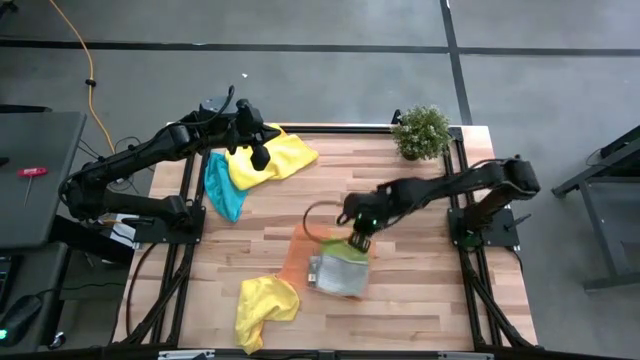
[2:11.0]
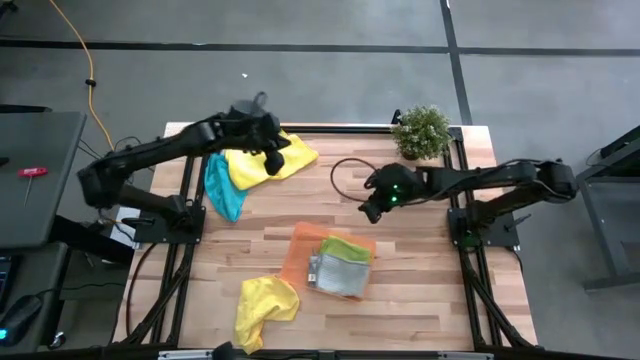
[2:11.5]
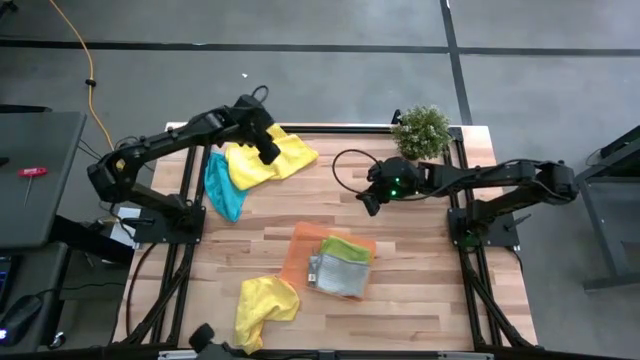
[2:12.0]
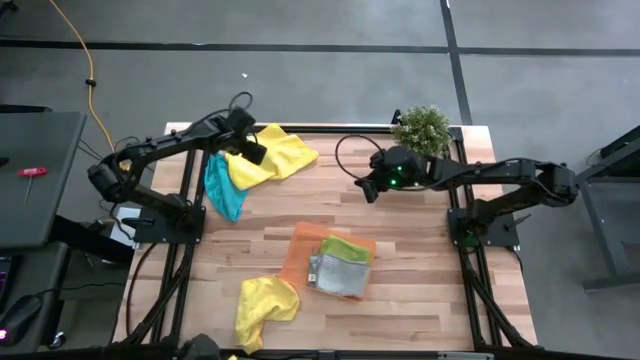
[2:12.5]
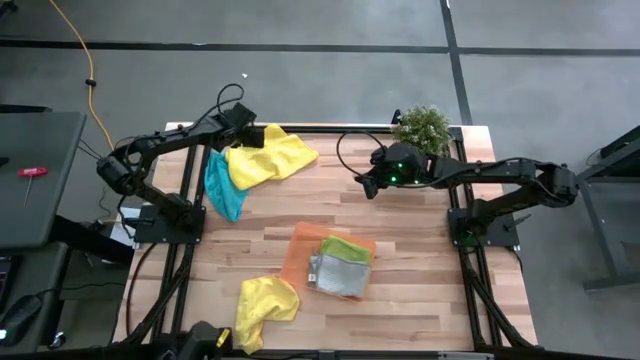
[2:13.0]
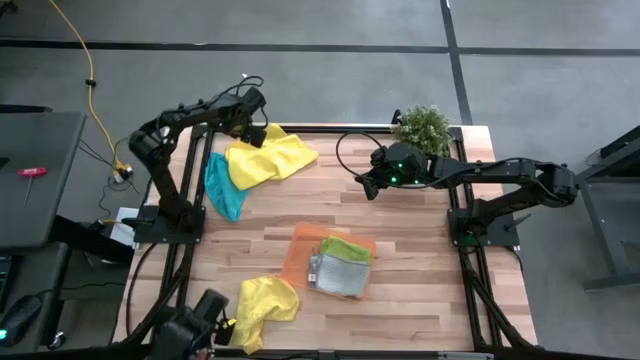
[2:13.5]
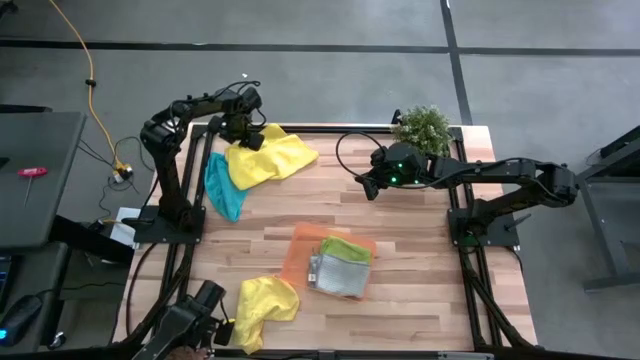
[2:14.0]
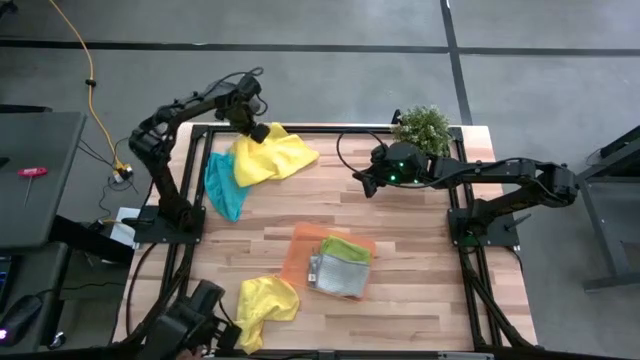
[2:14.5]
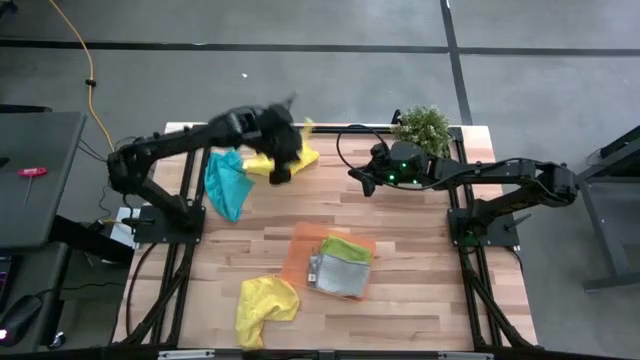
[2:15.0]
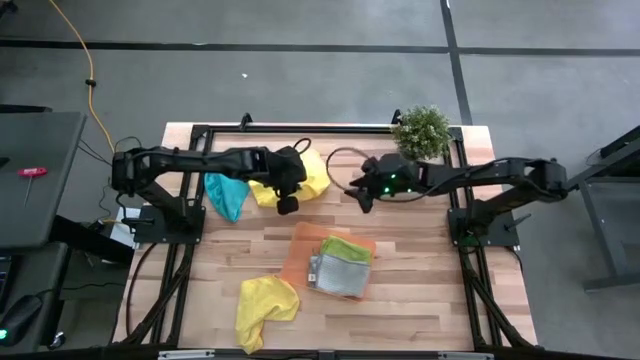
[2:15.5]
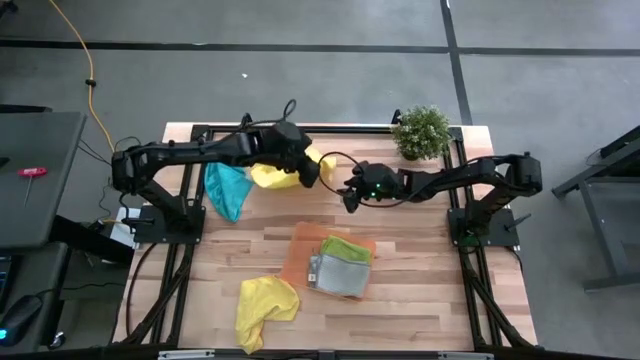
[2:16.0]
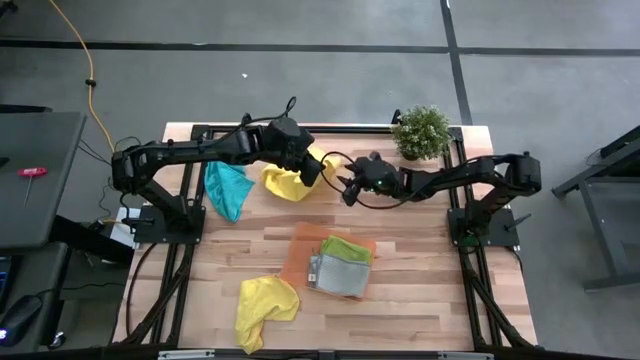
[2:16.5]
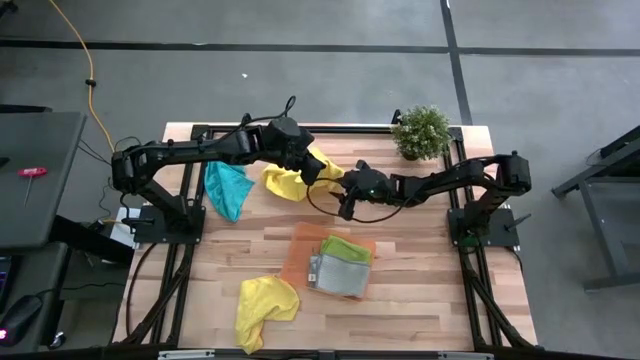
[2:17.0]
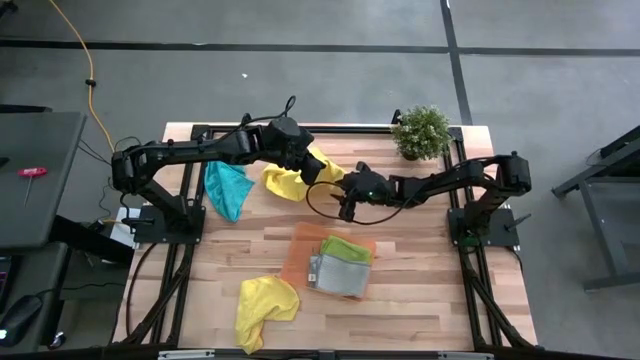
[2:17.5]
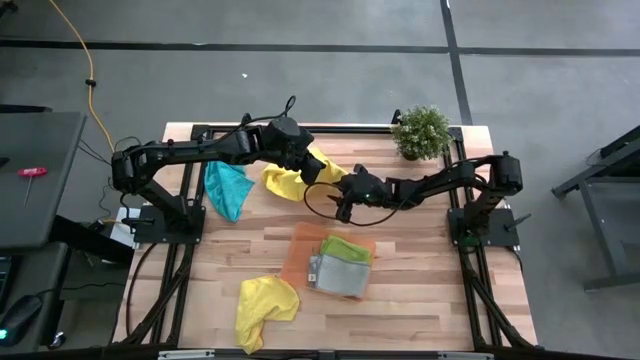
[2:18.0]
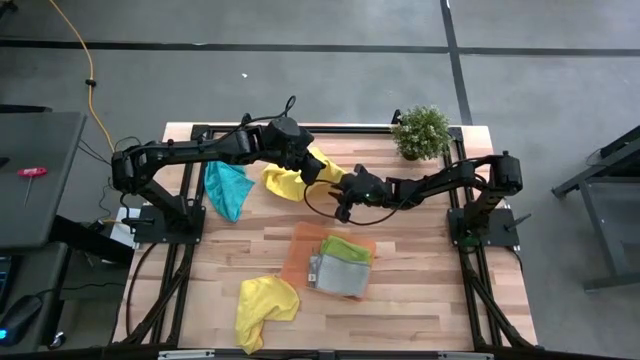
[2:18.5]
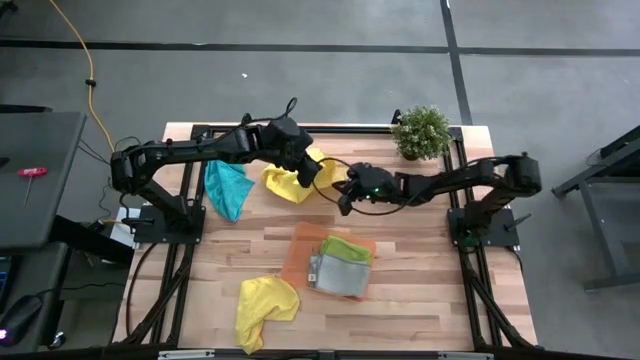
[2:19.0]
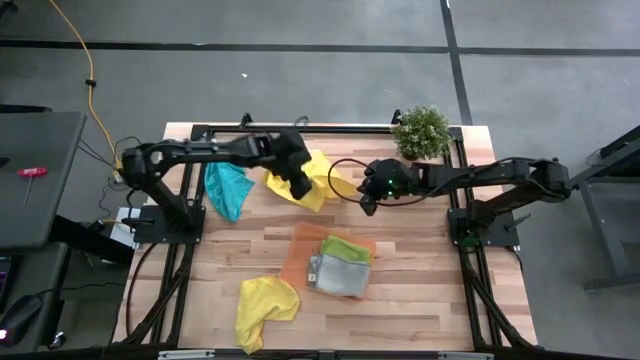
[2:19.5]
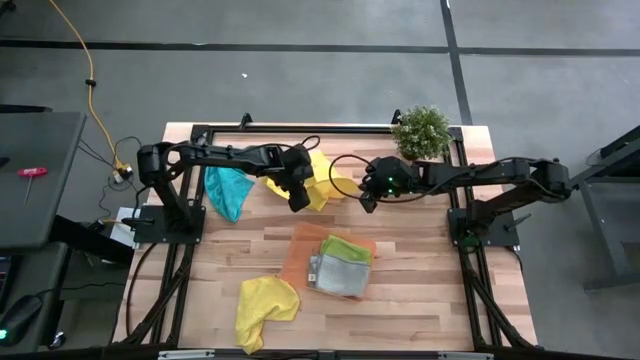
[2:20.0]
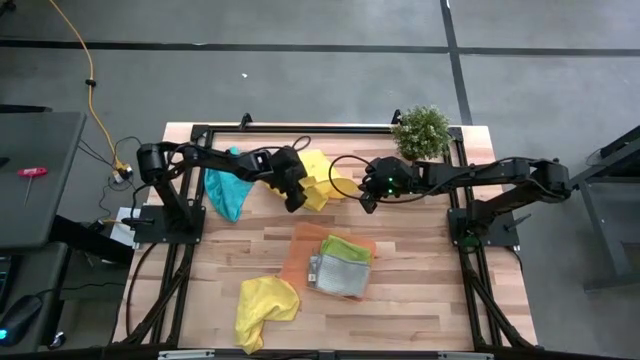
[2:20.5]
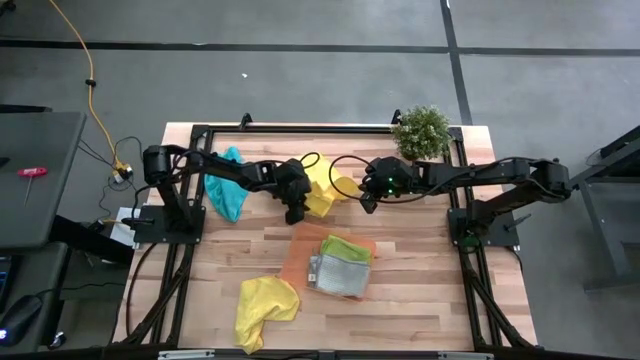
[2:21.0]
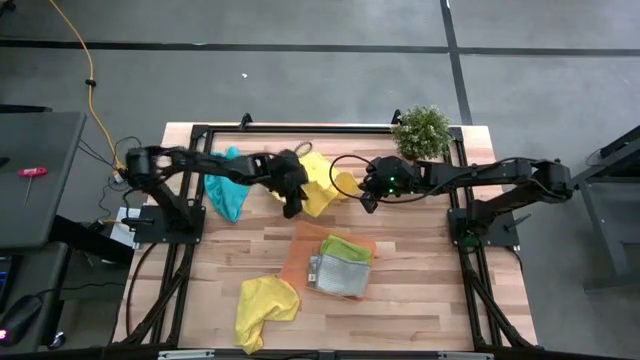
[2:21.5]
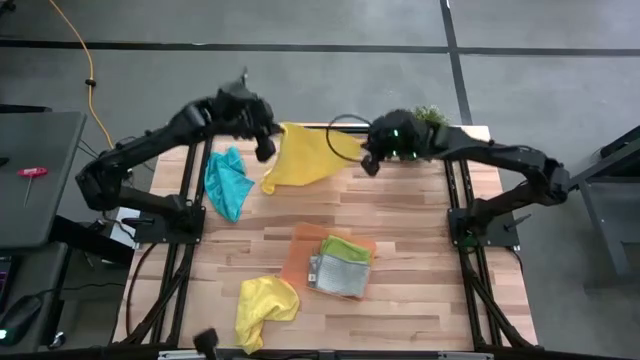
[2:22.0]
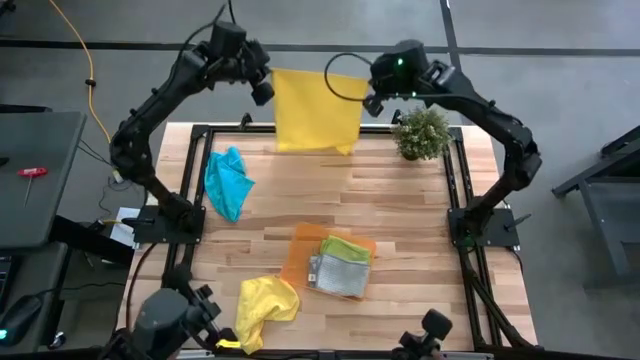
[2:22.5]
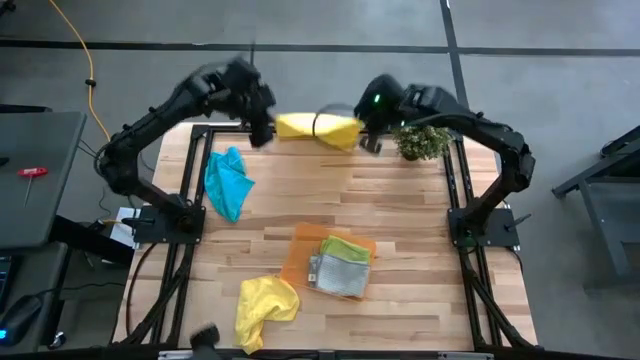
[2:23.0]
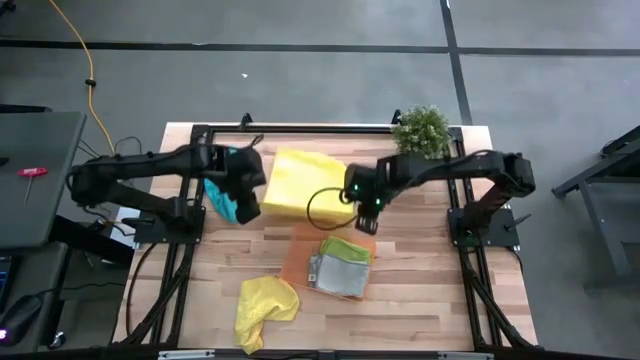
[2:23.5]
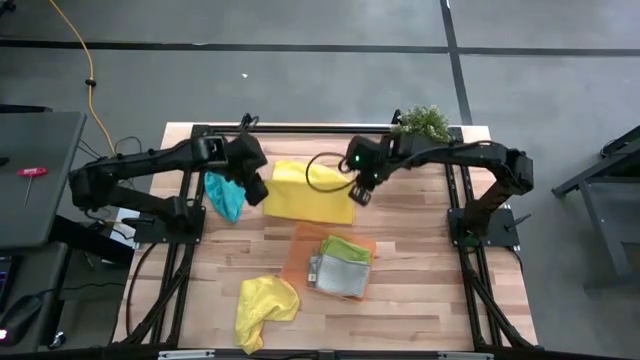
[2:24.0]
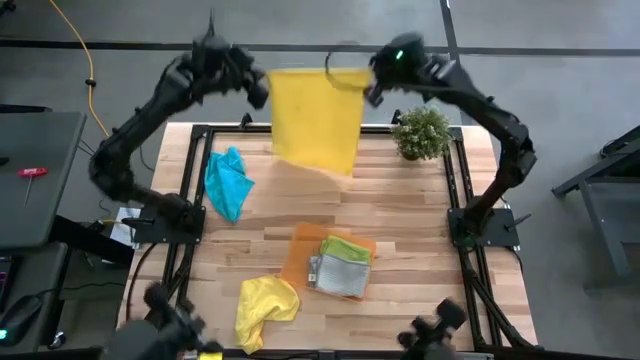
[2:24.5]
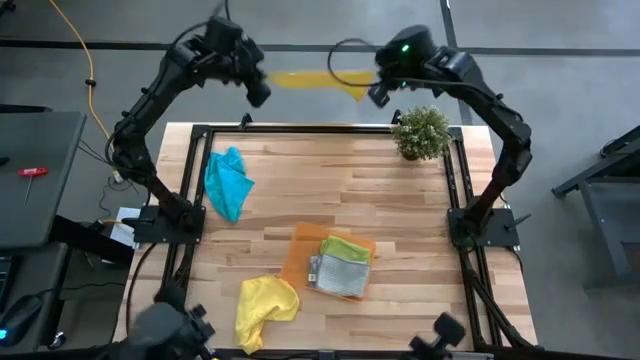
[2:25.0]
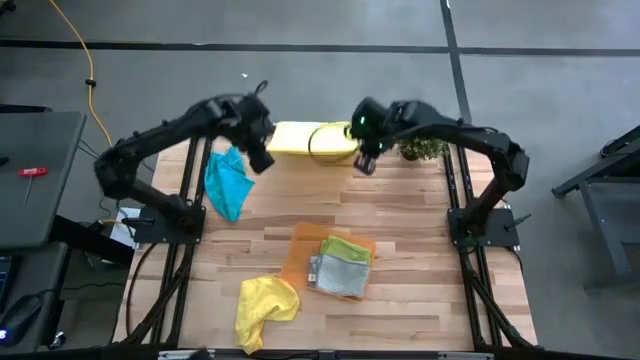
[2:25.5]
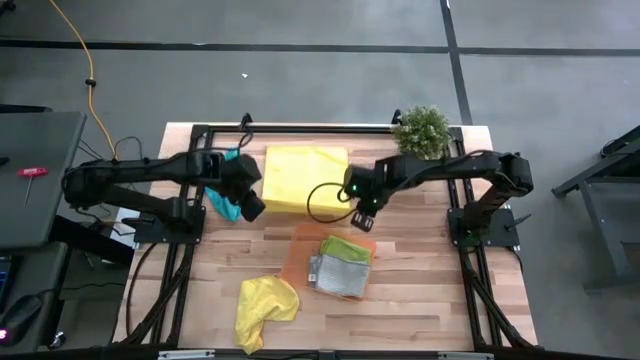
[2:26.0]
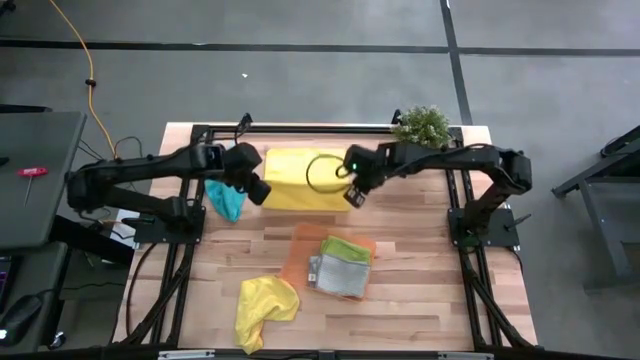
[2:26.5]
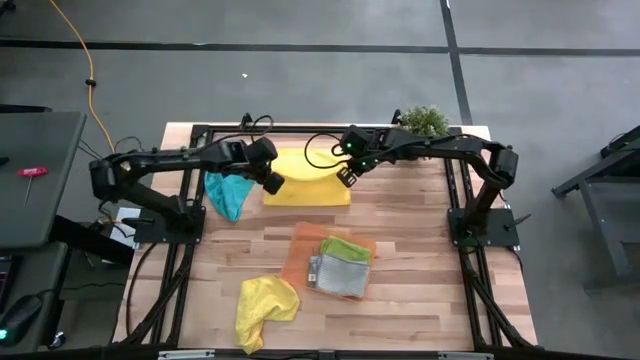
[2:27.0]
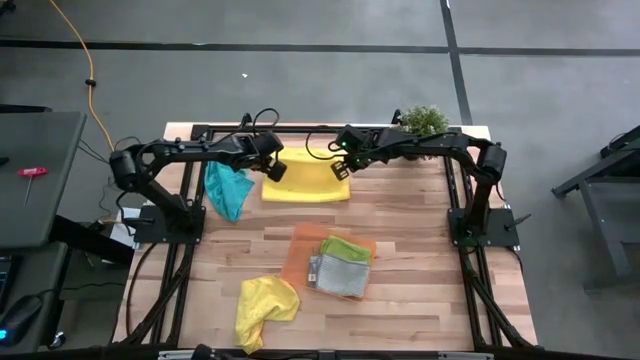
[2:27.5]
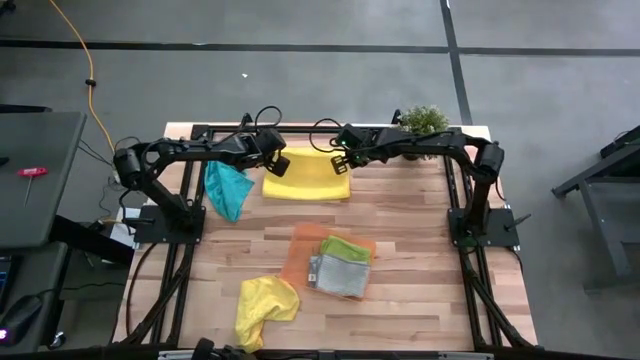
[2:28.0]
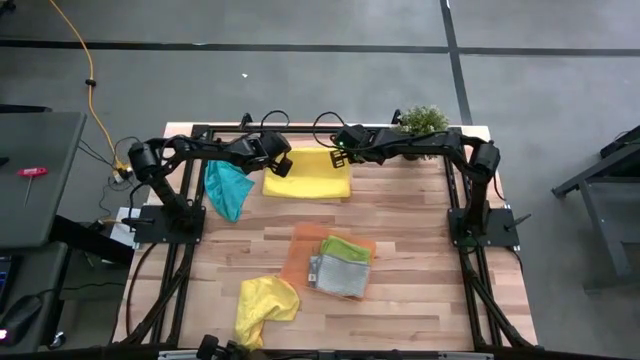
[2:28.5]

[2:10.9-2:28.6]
Task: Fold microfiber towels
Fold the top yellow towel
